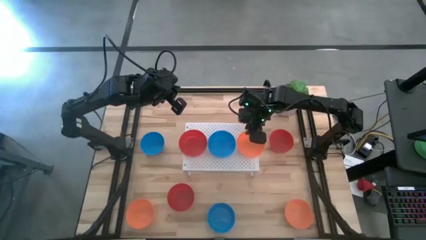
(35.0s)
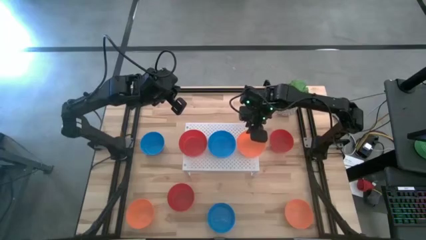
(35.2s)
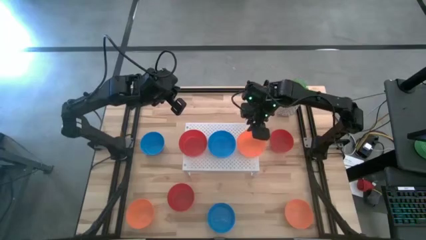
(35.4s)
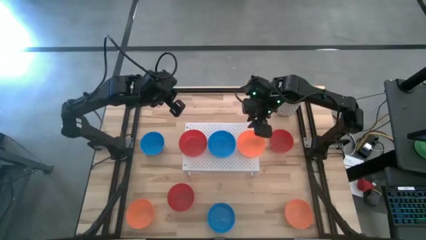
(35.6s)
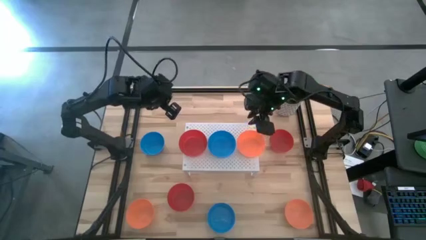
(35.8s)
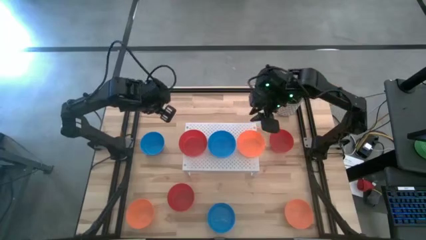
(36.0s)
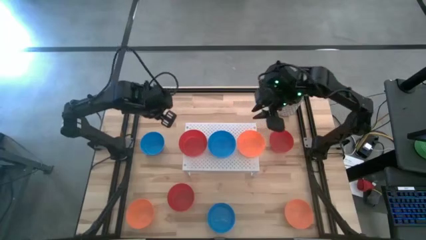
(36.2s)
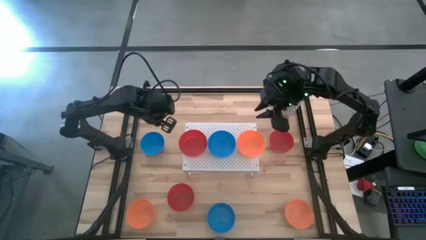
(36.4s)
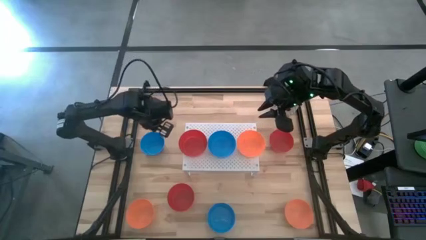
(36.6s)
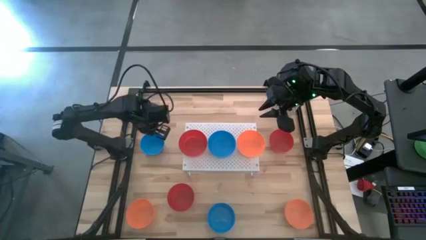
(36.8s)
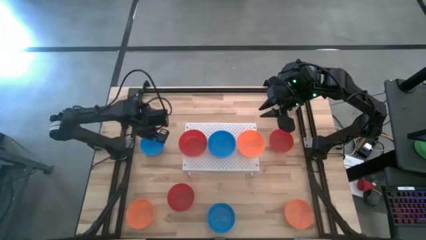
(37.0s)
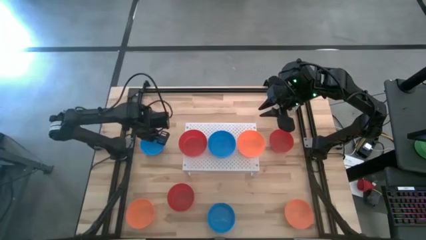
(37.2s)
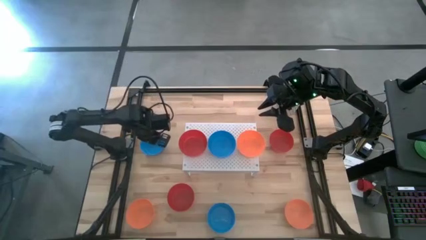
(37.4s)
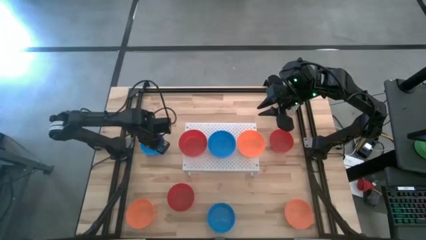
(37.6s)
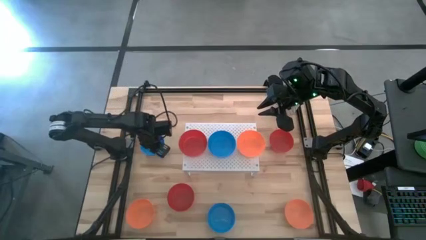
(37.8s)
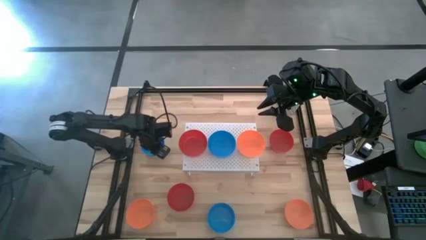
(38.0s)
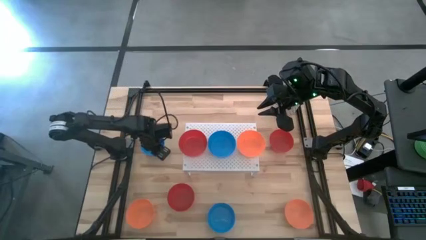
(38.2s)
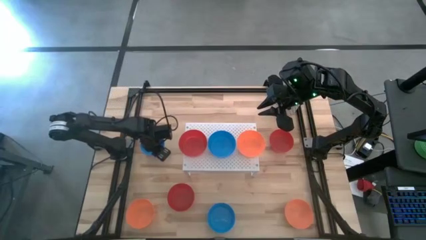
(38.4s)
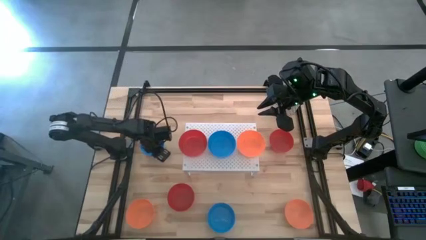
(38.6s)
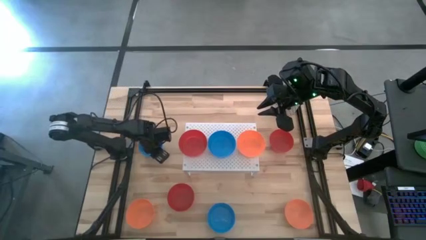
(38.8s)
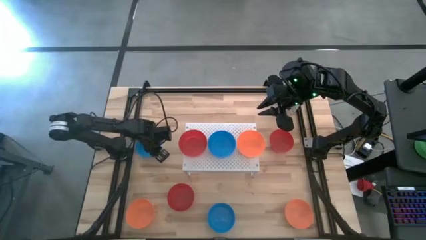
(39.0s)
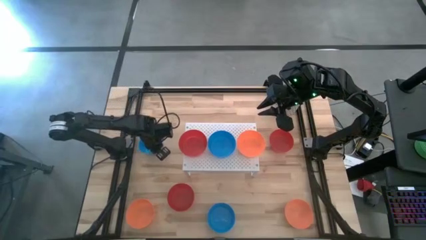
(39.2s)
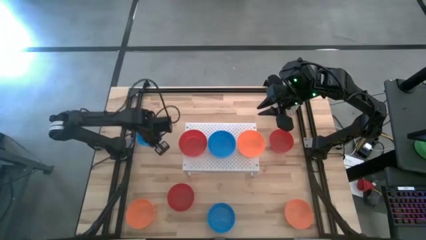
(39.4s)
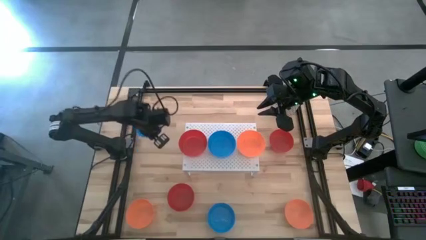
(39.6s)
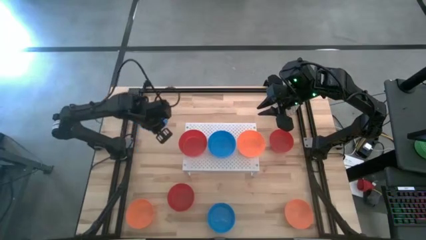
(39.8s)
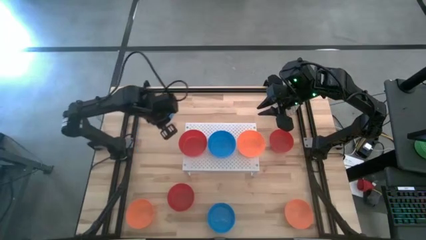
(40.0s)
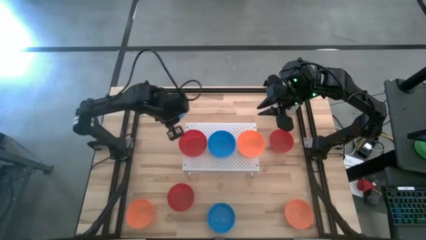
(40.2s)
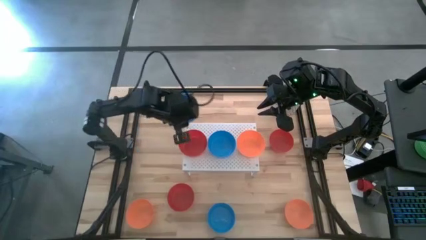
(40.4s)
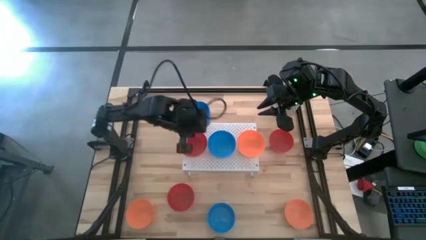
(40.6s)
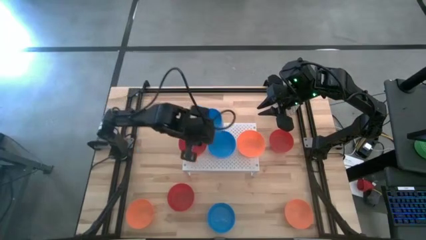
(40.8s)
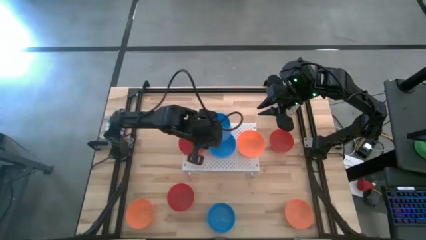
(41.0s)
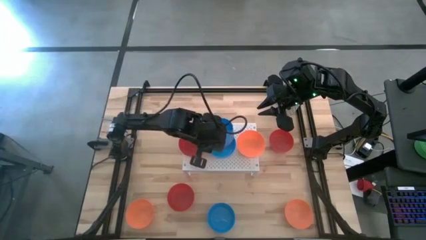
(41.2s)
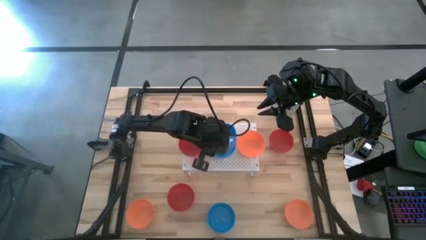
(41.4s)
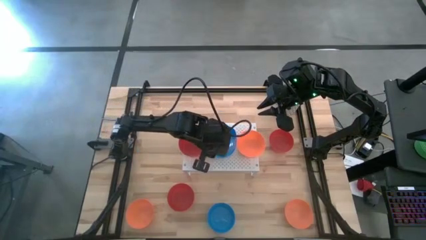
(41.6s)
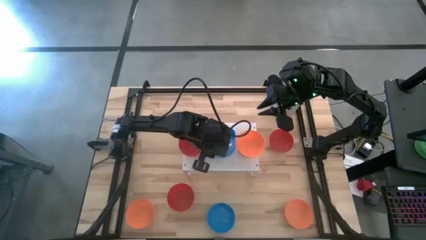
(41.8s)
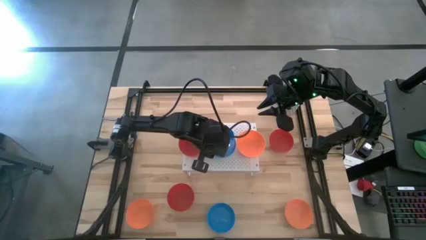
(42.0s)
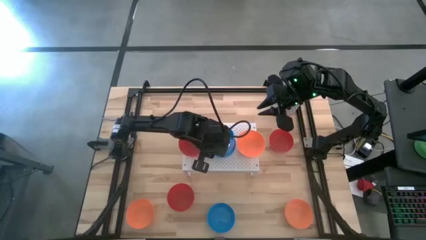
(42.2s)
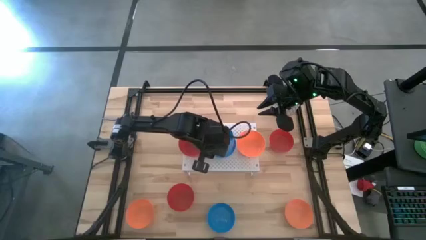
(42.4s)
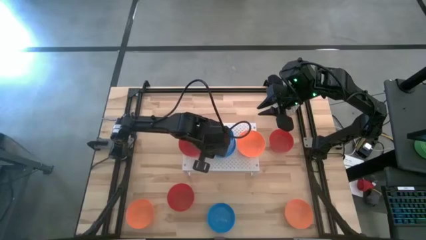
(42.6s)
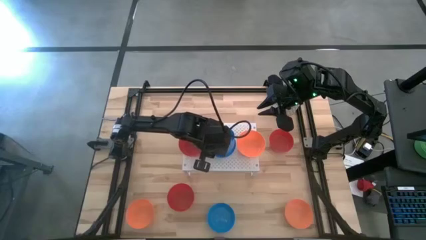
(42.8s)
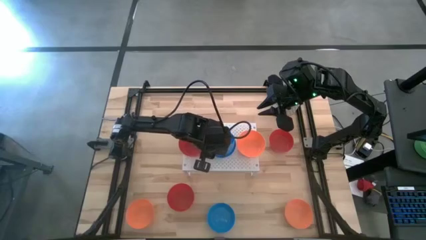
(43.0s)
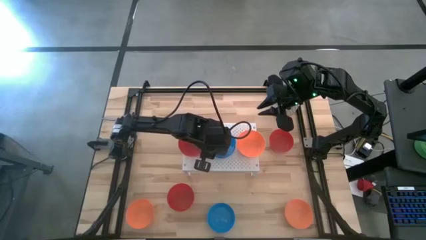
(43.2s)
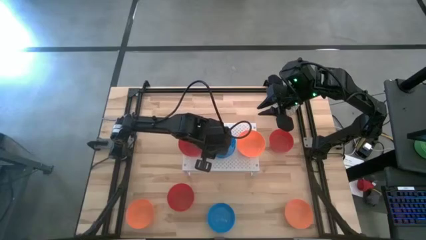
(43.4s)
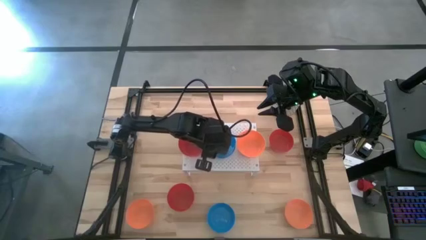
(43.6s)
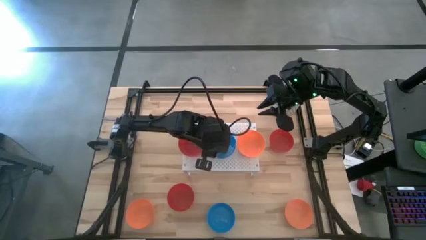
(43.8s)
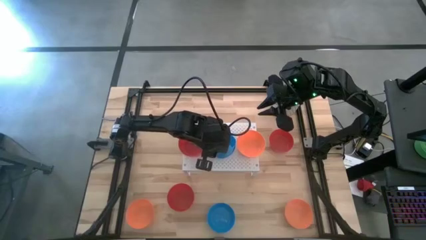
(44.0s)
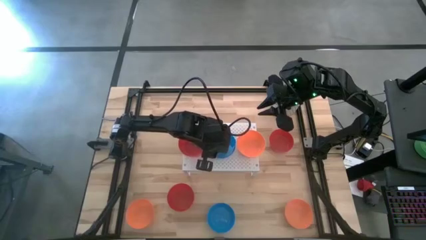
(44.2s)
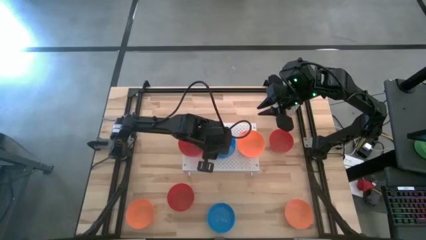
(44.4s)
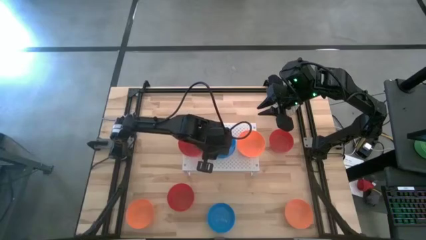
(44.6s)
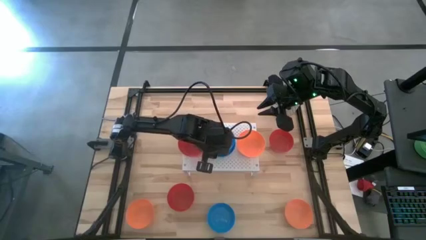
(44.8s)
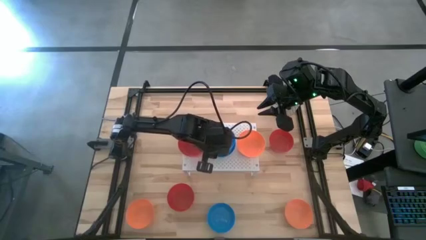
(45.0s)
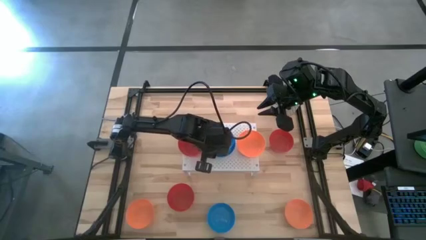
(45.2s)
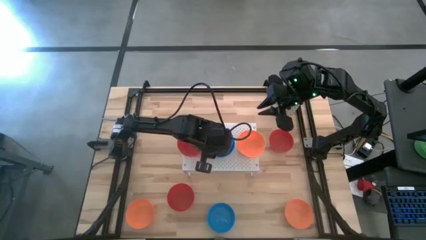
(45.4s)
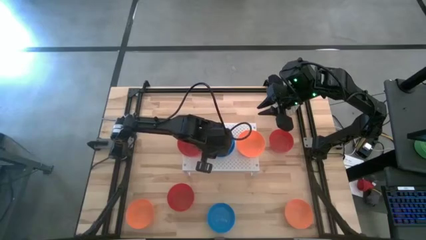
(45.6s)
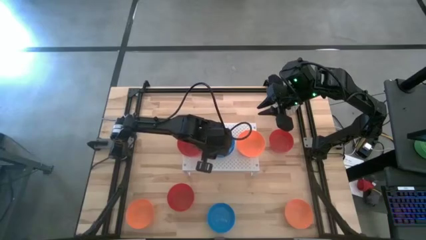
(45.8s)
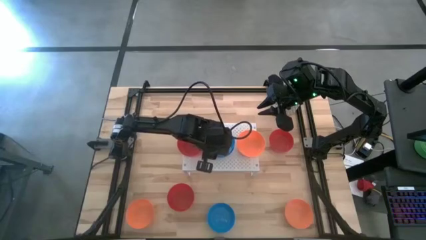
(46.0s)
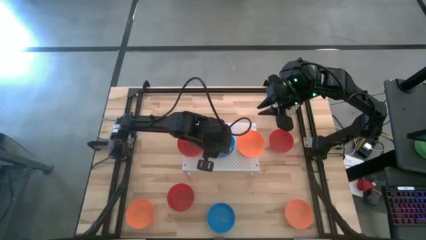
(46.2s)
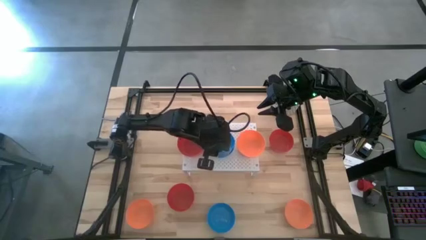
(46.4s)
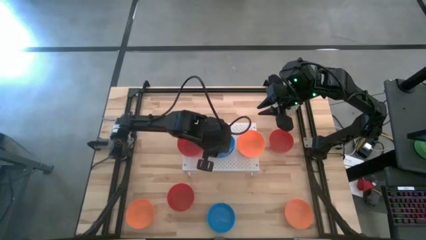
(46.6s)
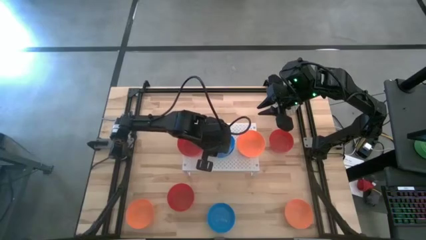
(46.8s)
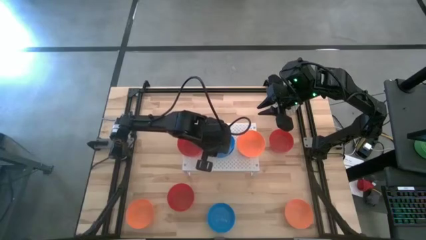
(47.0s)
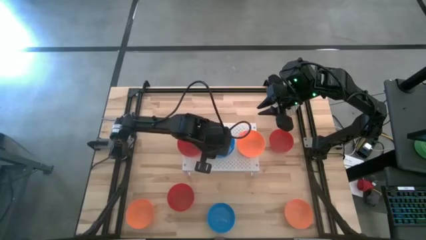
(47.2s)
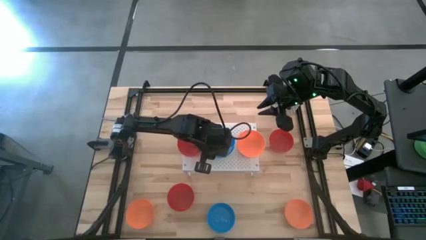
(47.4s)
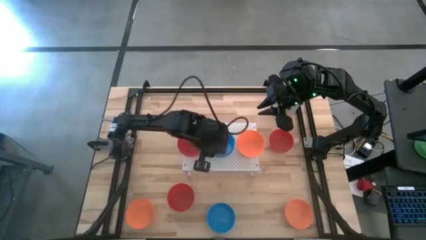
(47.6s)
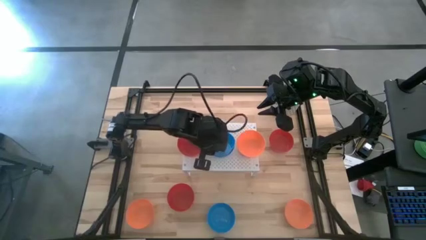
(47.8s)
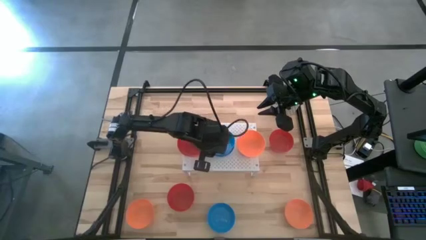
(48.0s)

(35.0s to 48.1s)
Task: Pick & Place Mini bowls
Stack the top blue bowl on the blue bowl on the shelf

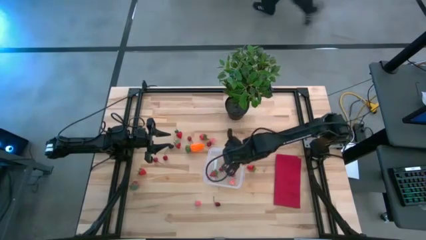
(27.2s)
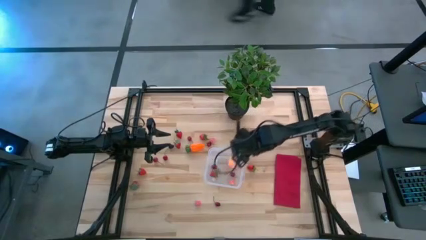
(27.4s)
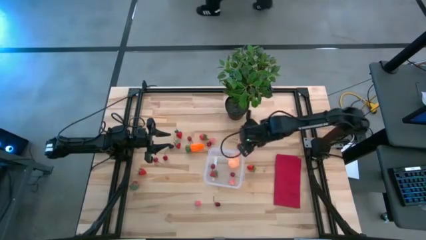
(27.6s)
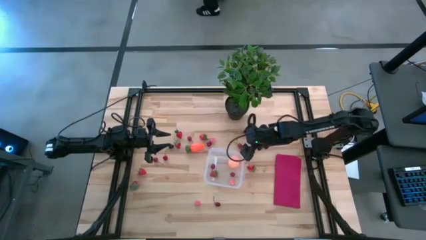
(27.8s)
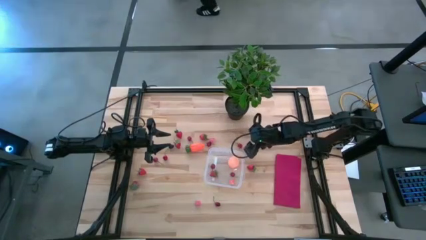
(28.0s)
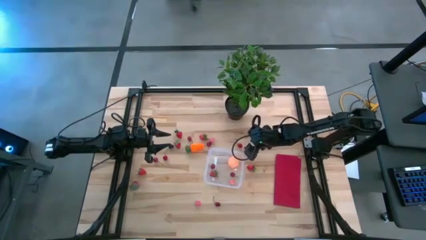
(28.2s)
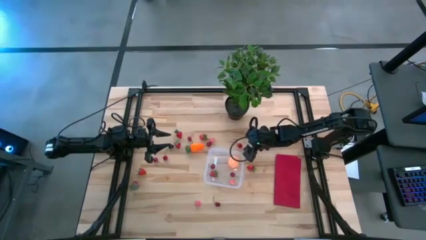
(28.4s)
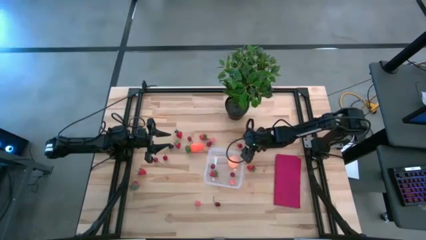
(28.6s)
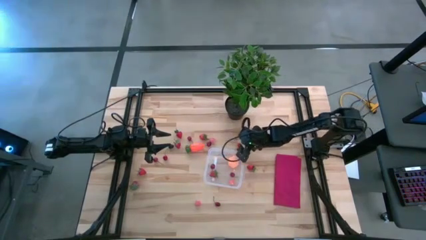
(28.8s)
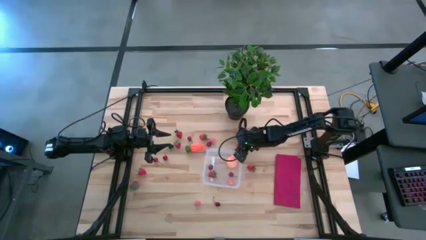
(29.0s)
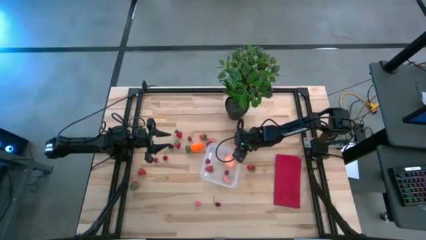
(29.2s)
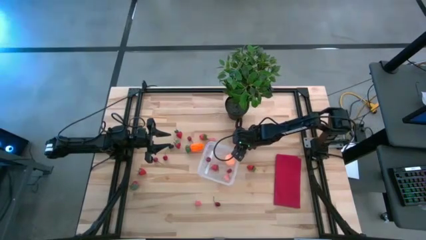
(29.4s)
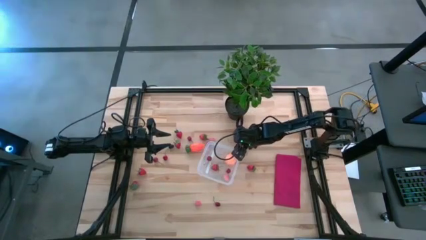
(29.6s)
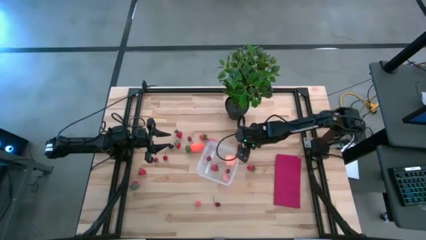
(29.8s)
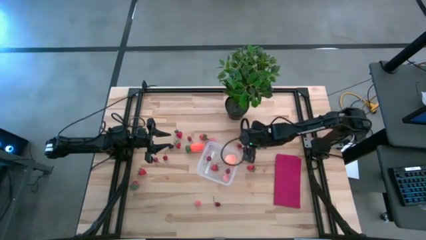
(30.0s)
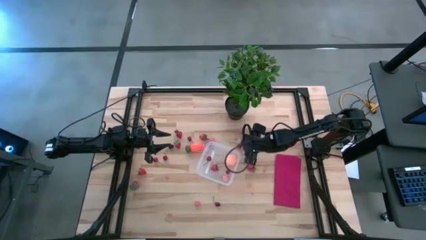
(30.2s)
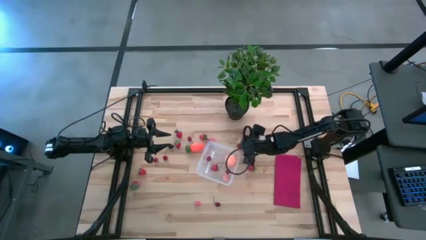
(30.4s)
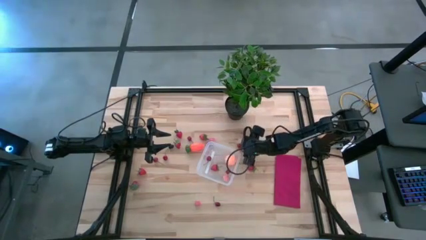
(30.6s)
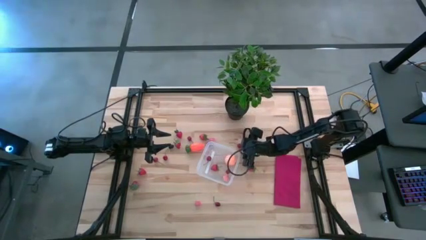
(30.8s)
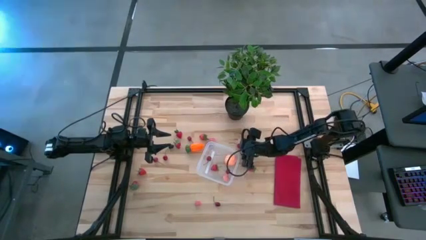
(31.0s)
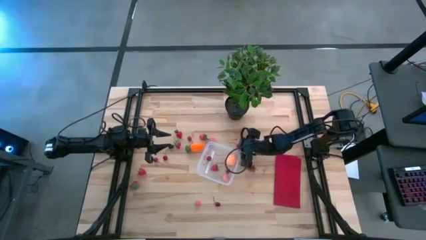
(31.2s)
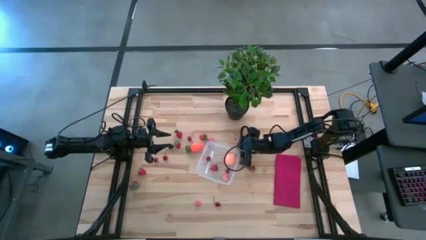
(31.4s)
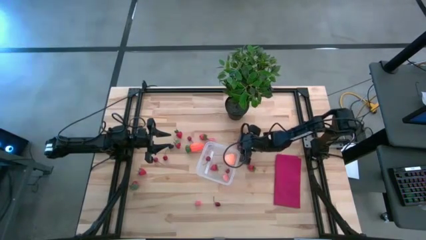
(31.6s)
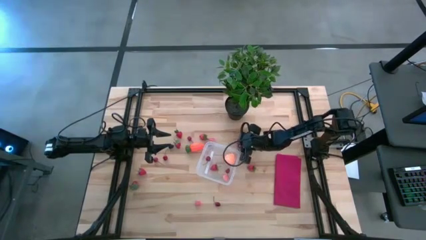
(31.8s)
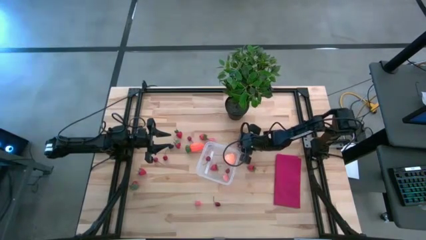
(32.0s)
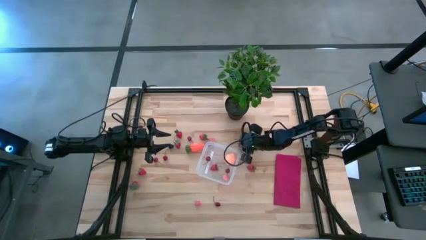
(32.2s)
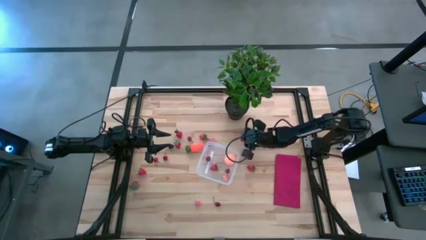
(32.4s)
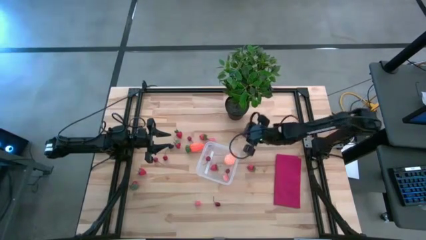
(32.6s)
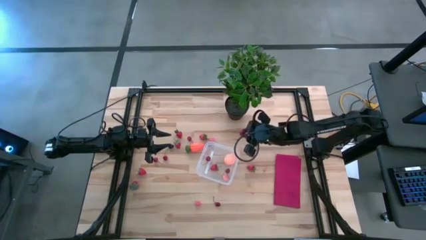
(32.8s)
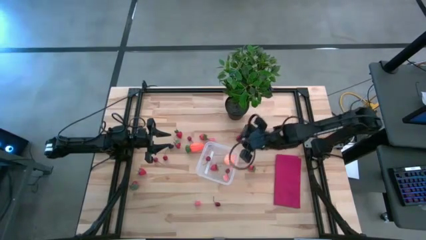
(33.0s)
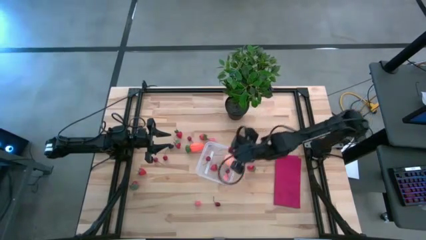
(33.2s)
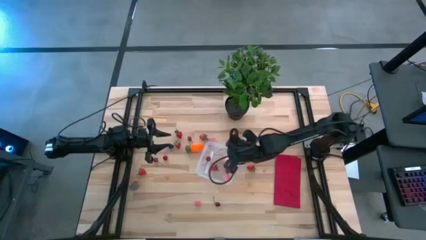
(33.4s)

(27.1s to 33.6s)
Task: Pick and placing Produce into tupperware
Put the red cherry into the transparent bin
